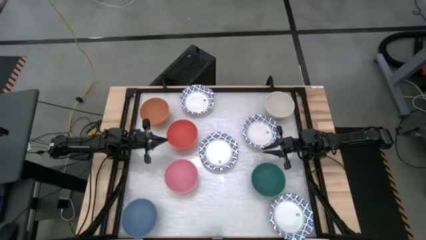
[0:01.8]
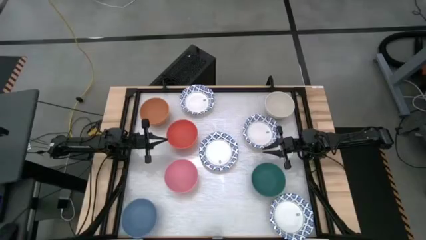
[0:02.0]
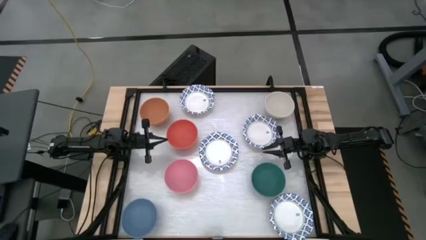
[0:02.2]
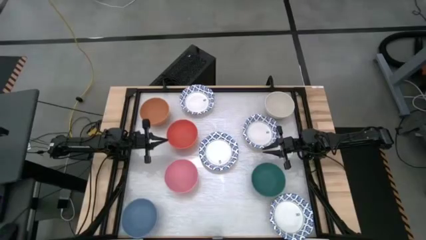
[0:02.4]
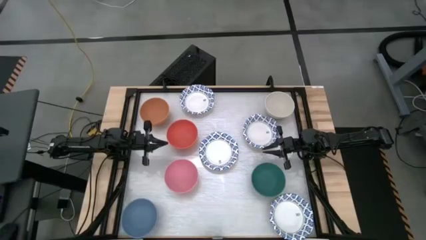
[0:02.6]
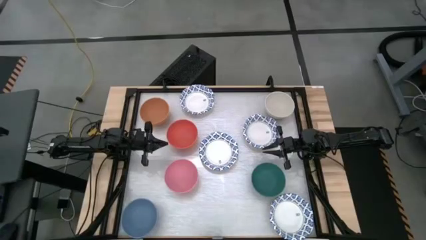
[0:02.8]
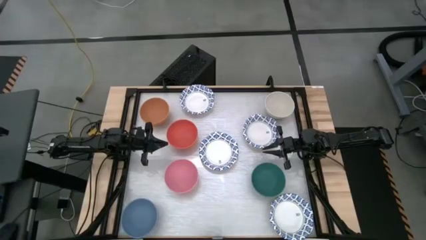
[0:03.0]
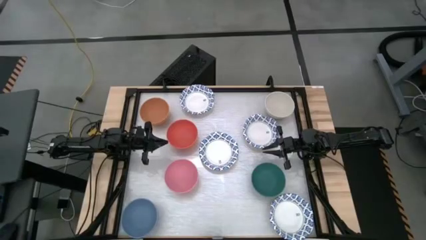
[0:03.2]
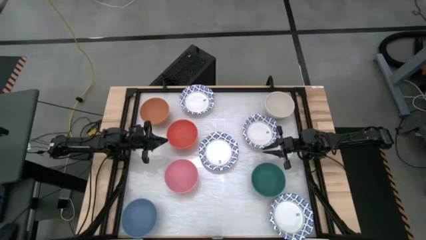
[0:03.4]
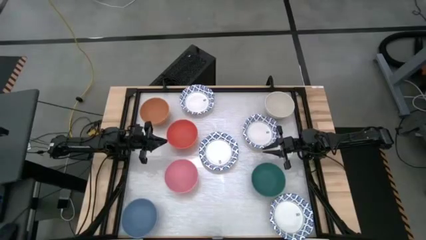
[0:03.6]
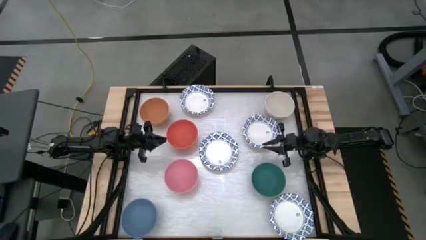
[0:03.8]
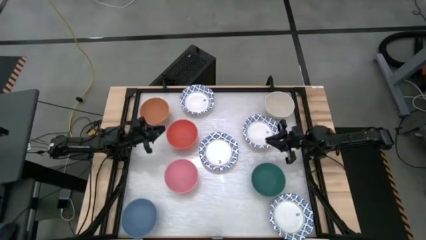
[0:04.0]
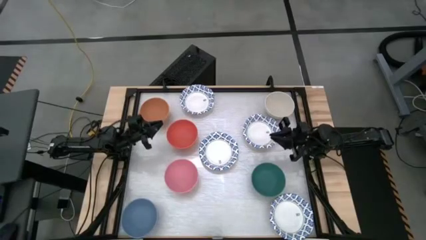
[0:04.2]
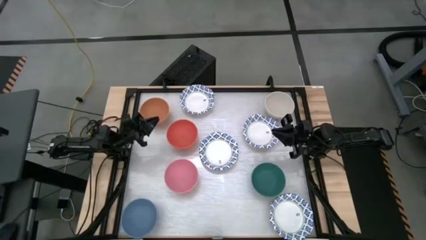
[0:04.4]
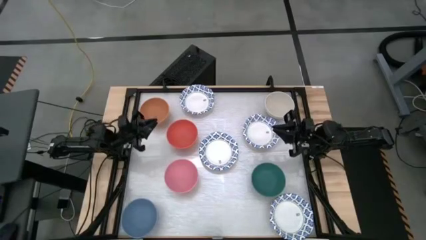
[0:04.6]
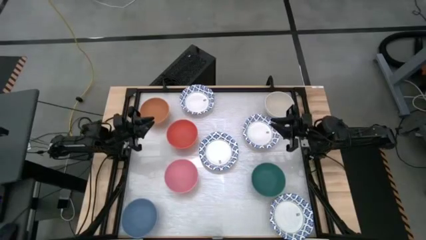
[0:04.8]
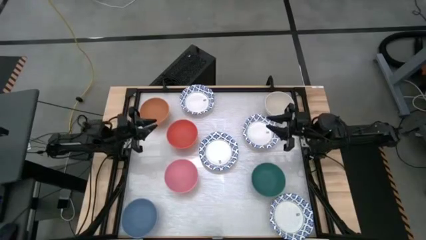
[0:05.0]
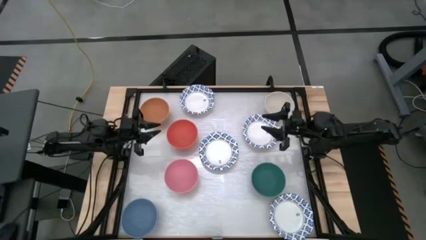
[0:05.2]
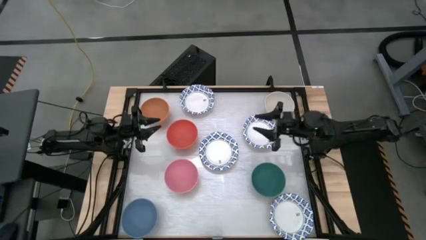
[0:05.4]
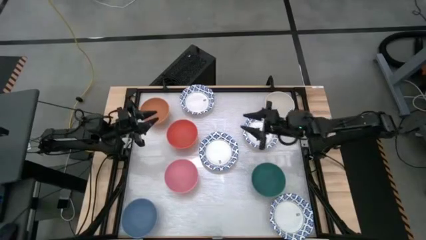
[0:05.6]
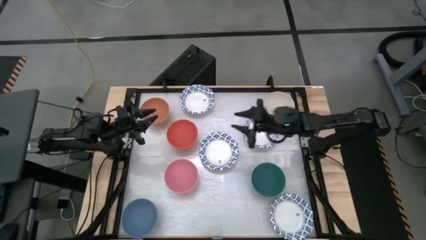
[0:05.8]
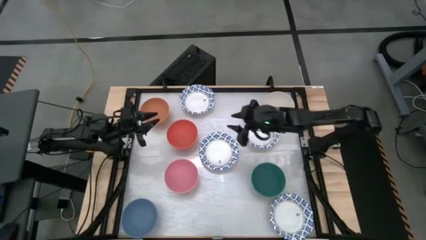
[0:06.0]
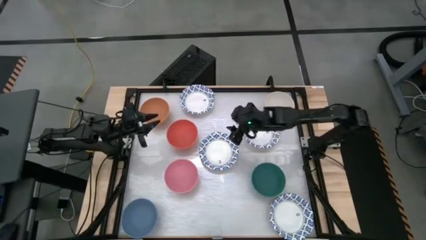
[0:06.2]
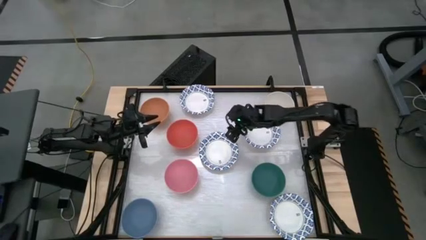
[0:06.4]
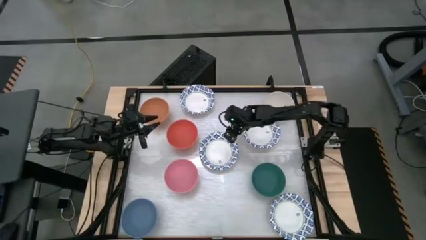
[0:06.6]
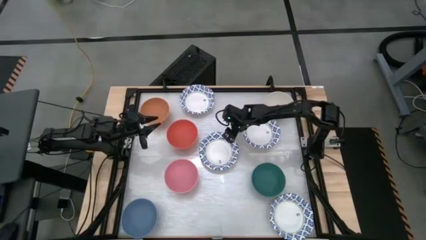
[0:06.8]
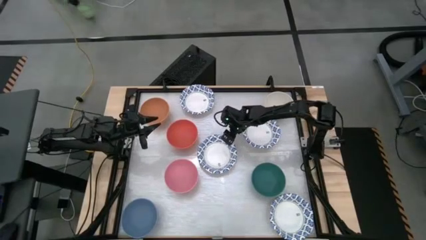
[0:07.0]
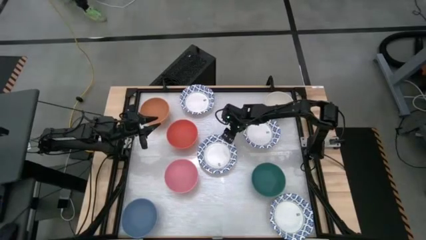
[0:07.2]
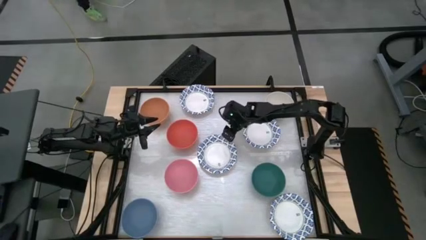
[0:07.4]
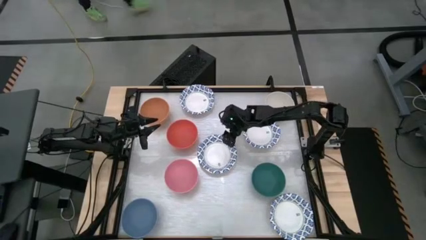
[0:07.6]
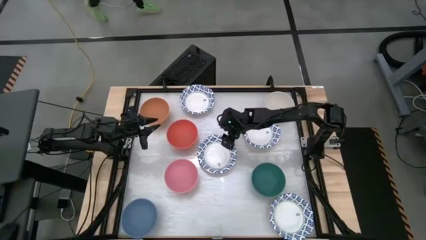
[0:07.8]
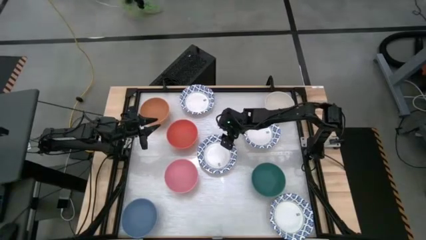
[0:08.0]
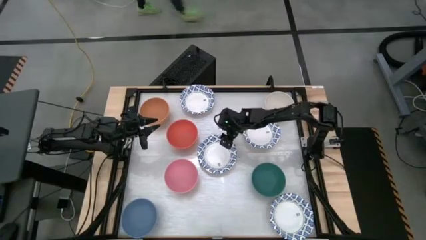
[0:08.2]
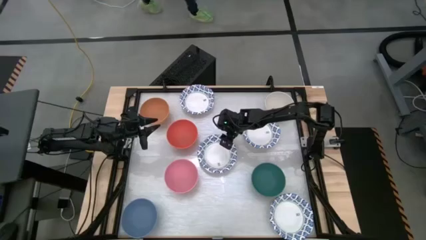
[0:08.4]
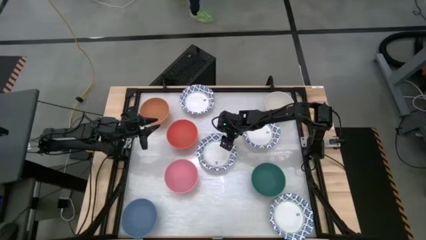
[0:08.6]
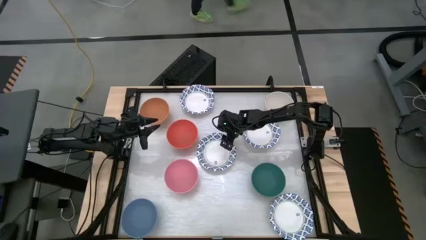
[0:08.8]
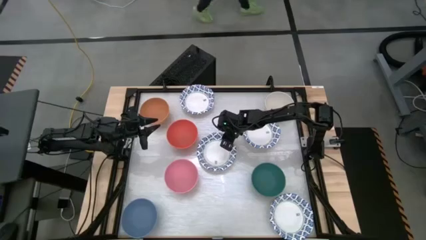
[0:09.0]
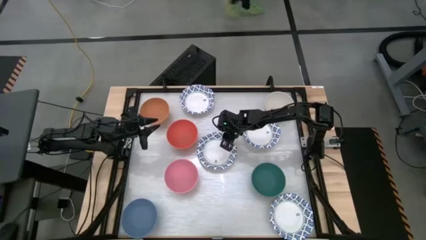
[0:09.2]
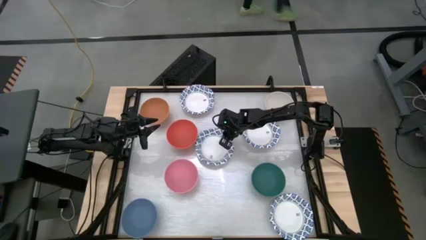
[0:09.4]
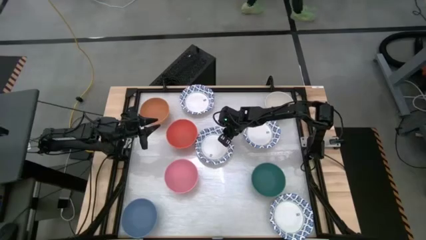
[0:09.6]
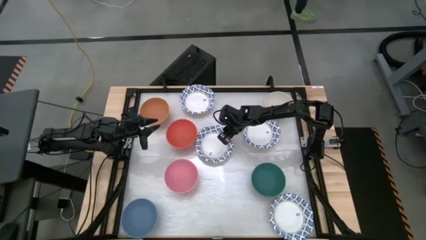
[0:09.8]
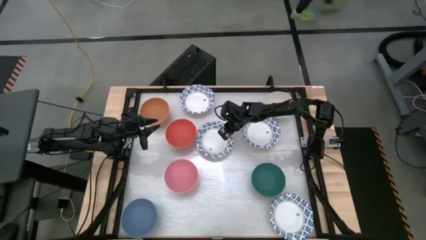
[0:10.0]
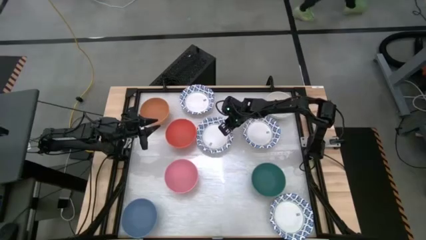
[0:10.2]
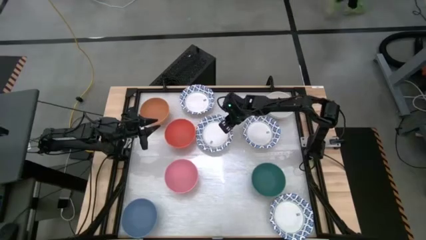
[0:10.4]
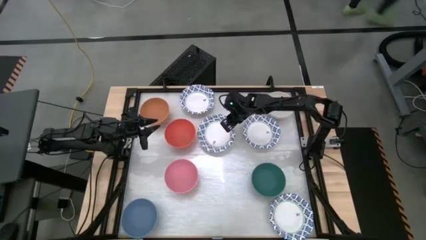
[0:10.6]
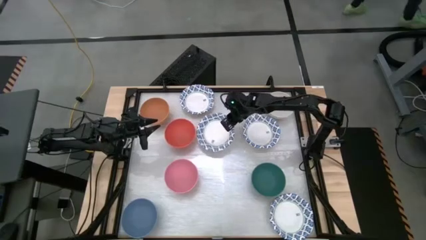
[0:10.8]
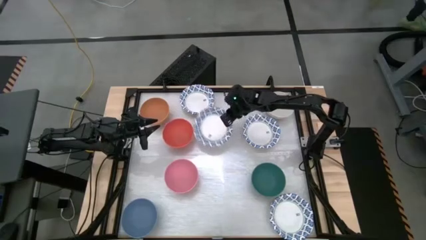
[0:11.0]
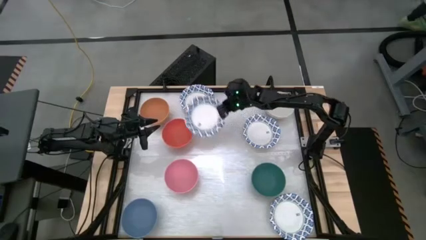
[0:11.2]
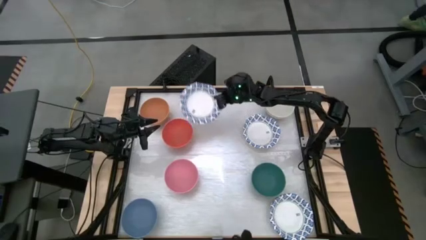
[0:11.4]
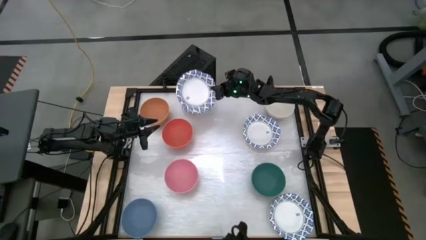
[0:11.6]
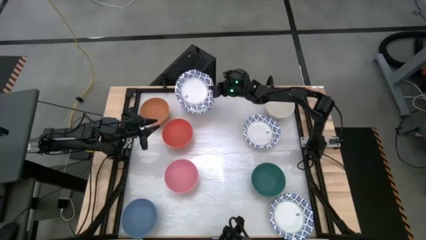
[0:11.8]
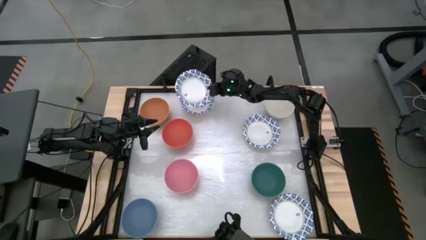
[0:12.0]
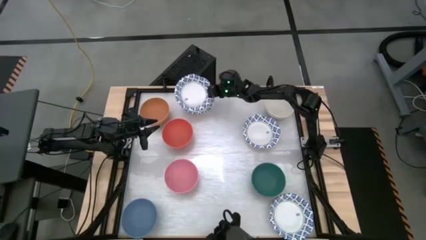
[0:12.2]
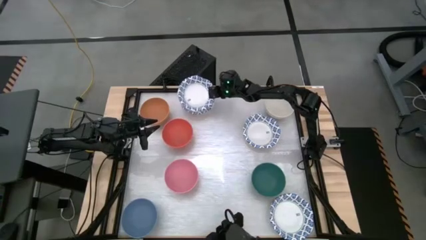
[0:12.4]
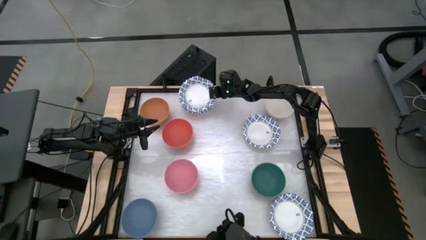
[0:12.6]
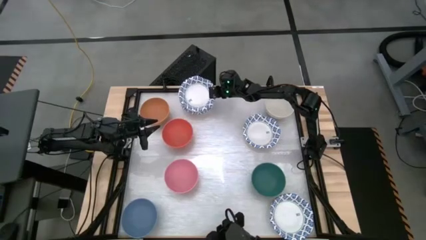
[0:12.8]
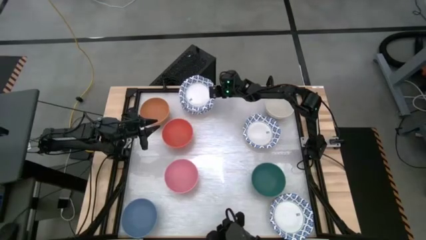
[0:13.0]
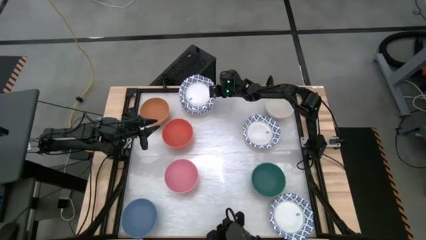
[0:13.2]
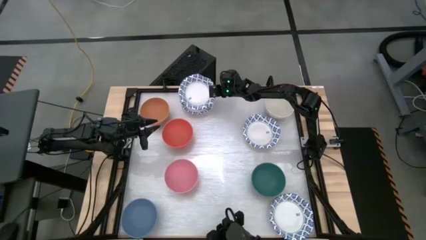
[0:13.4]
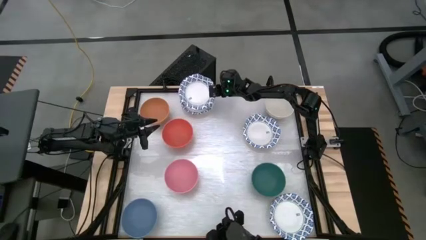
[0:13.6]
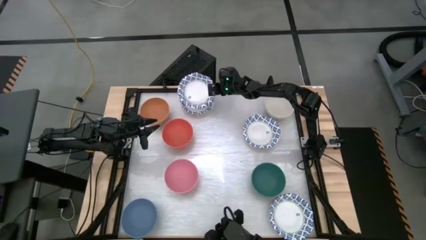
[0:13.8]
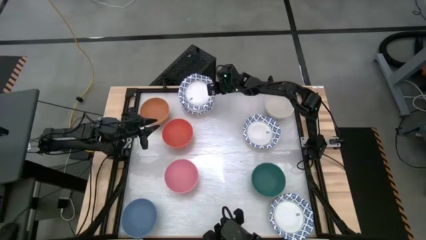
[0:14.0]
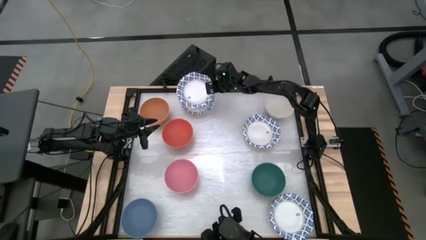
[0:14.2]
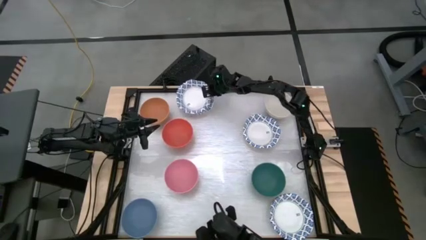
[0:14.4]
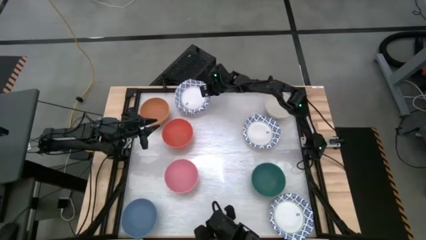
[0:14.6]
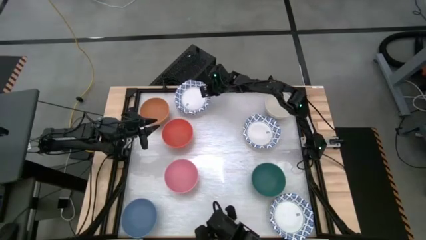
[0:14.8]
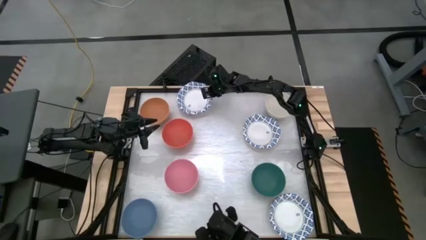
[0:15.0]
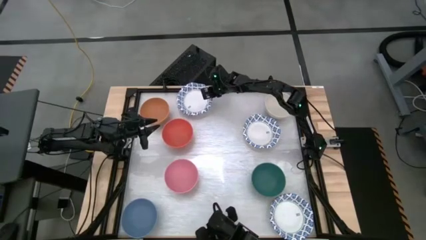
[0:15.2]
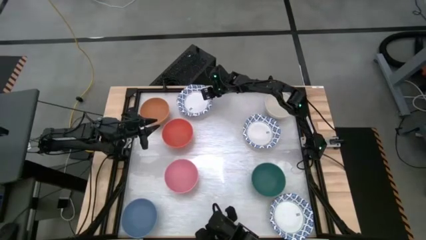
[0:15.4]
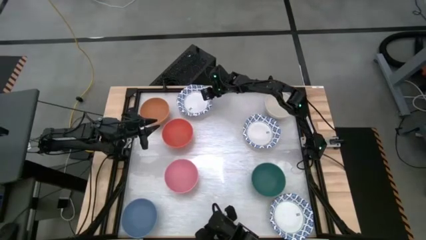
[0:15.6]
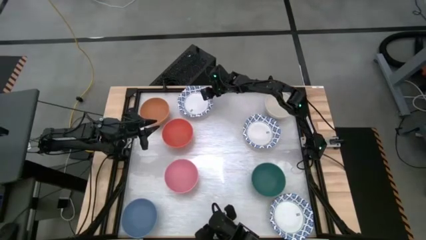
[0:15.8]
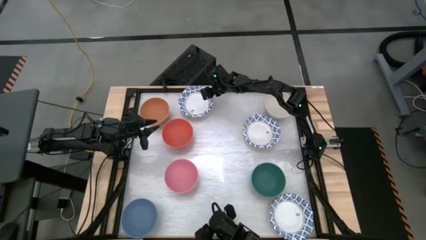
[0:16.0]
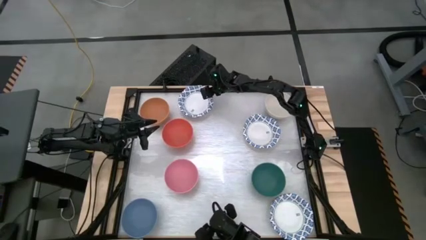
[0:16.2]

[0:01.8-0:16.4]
Stack the middle left white pattern bowl on top of the top white pattern bowl
